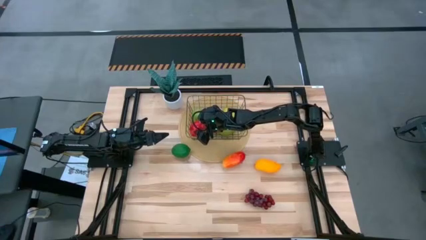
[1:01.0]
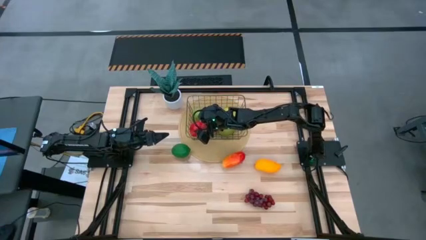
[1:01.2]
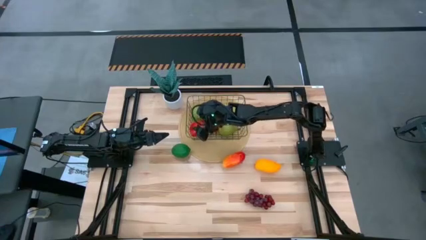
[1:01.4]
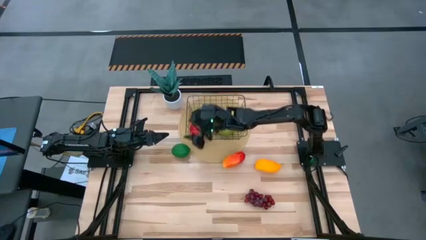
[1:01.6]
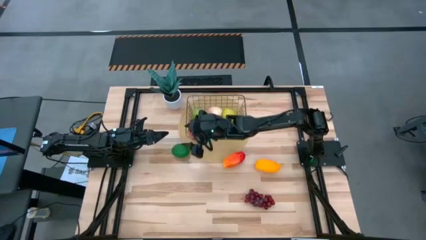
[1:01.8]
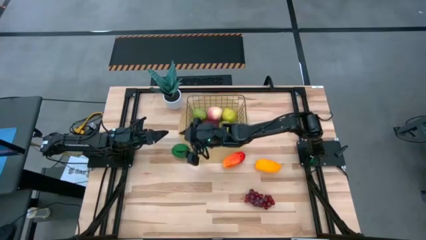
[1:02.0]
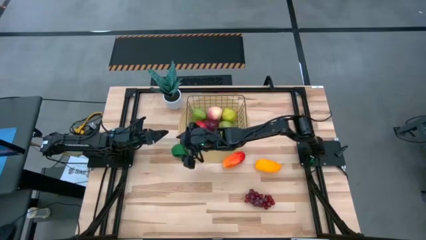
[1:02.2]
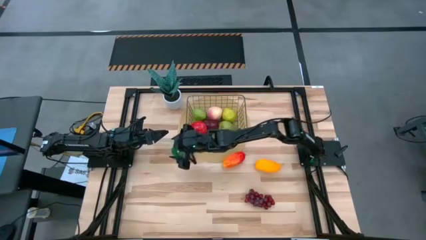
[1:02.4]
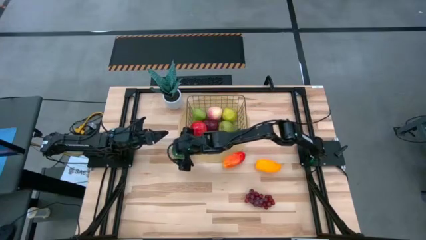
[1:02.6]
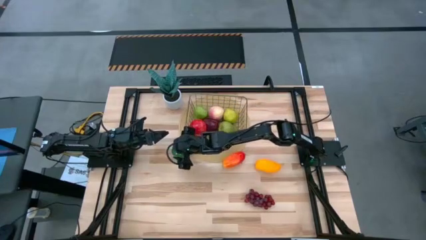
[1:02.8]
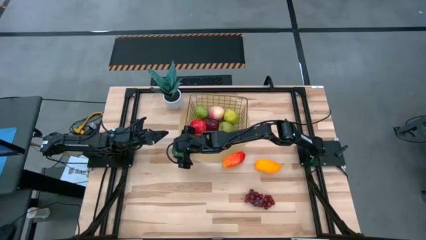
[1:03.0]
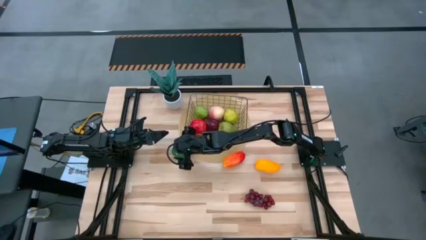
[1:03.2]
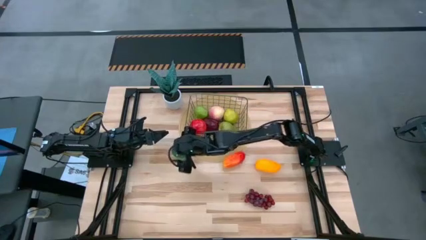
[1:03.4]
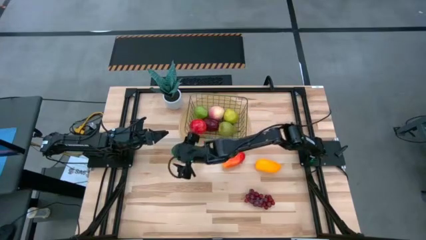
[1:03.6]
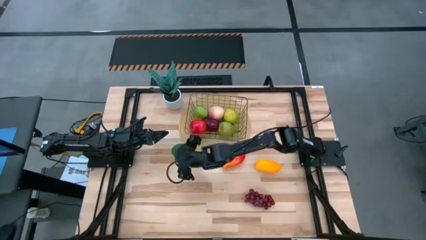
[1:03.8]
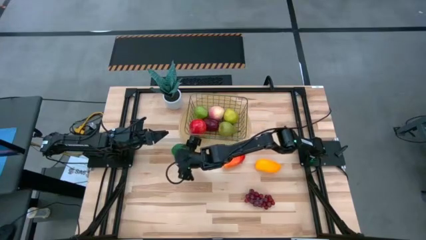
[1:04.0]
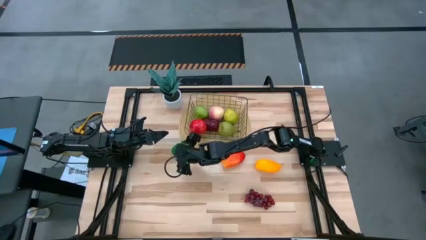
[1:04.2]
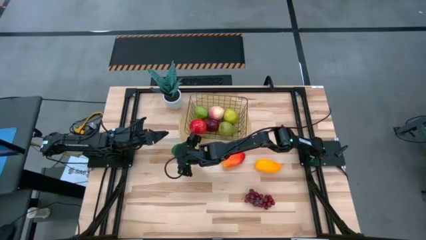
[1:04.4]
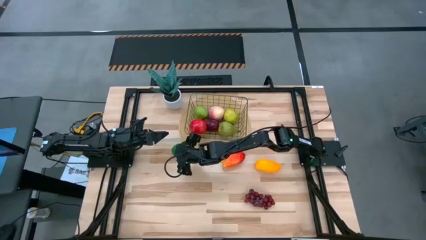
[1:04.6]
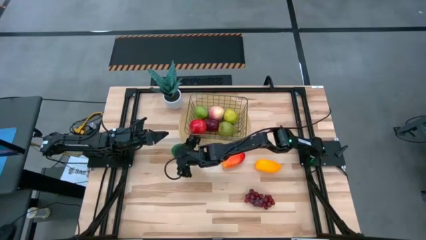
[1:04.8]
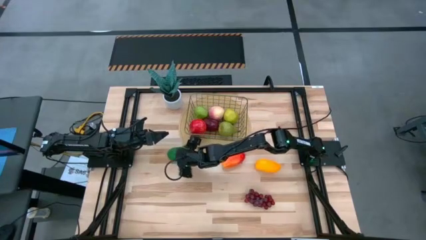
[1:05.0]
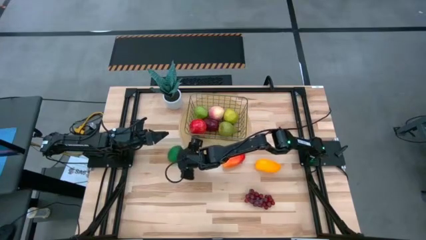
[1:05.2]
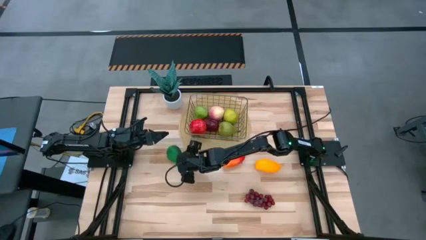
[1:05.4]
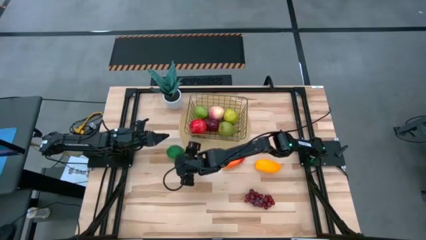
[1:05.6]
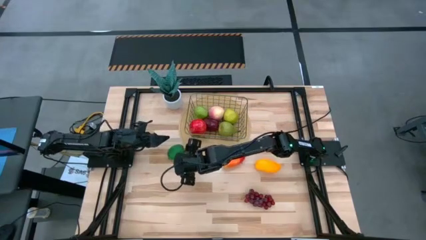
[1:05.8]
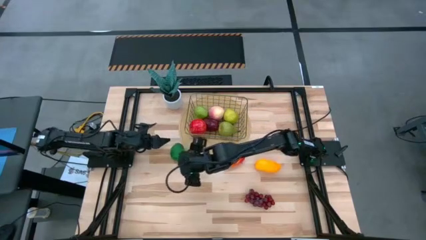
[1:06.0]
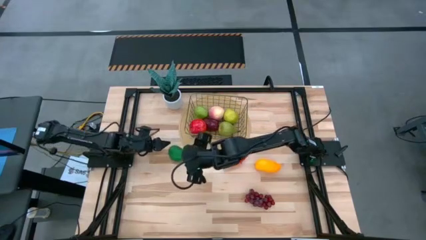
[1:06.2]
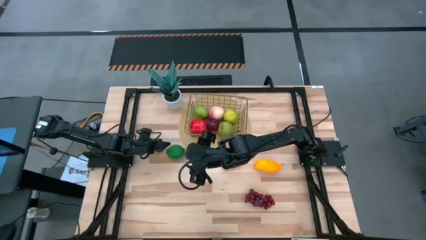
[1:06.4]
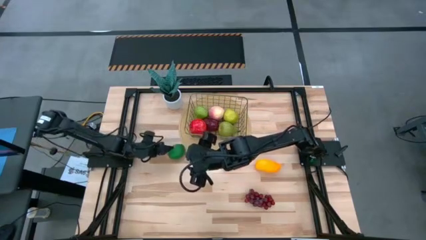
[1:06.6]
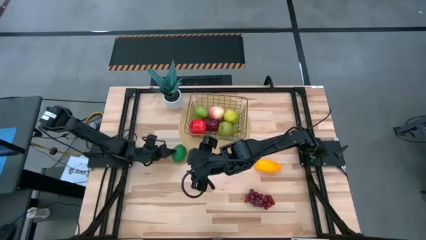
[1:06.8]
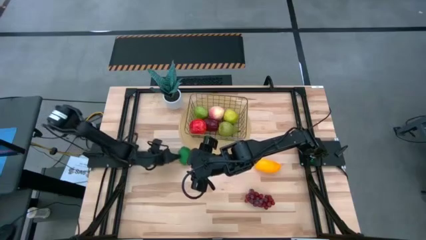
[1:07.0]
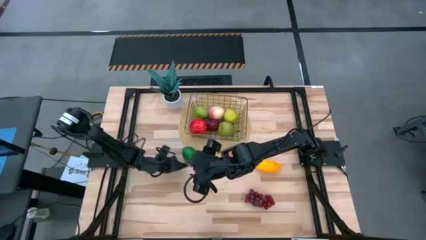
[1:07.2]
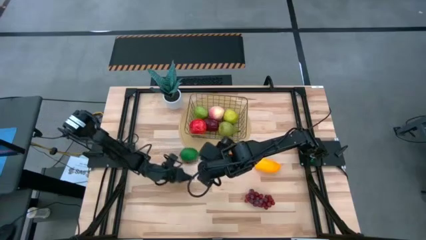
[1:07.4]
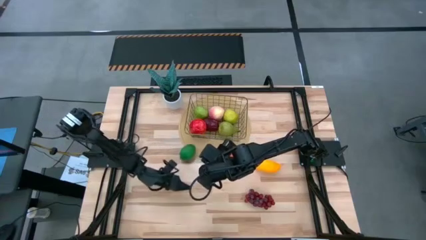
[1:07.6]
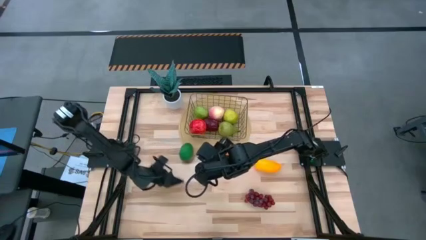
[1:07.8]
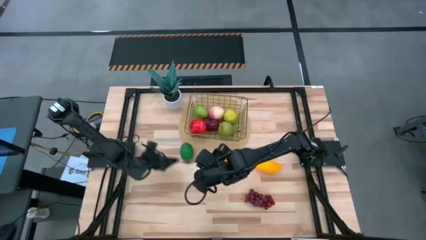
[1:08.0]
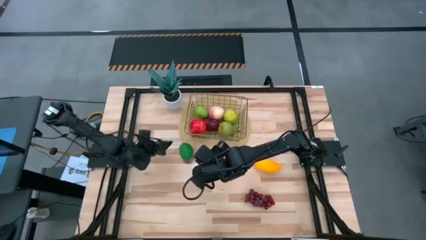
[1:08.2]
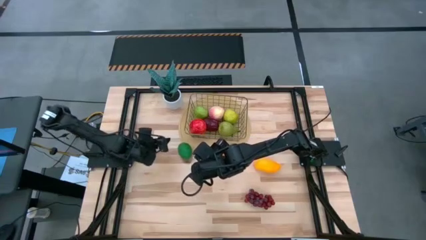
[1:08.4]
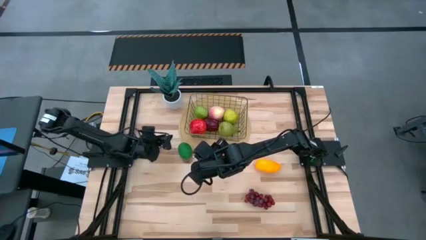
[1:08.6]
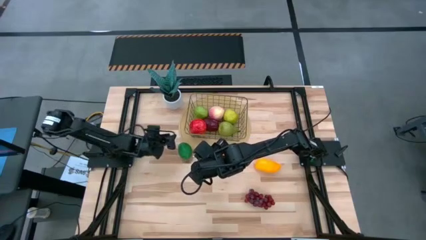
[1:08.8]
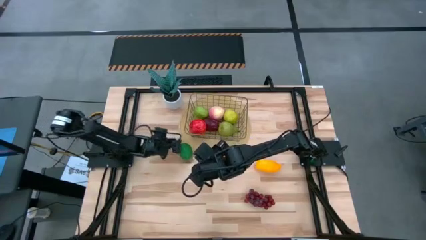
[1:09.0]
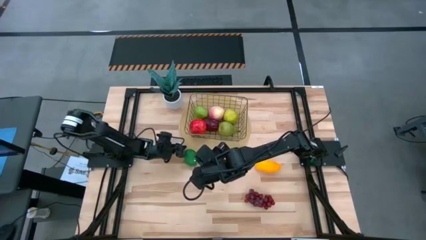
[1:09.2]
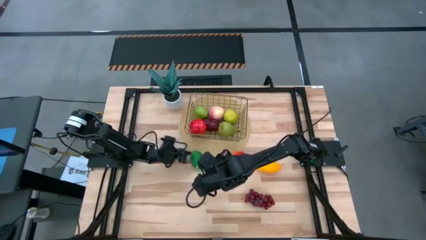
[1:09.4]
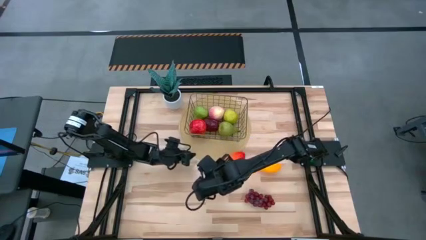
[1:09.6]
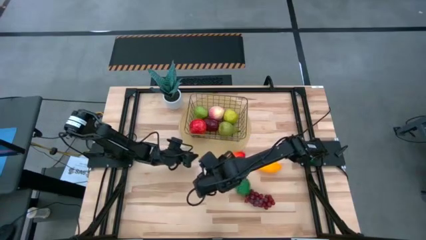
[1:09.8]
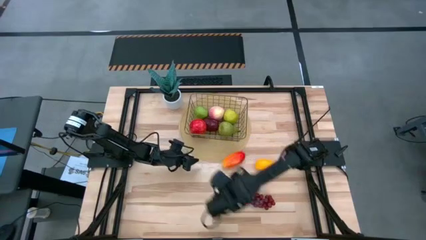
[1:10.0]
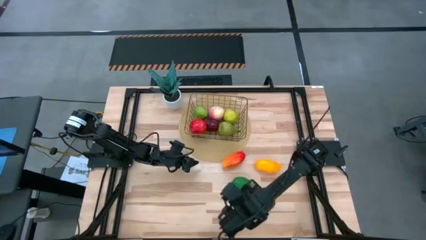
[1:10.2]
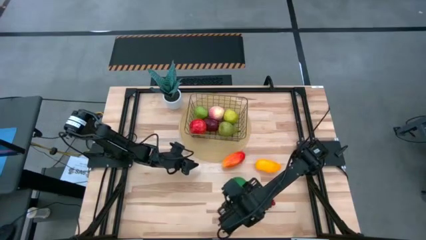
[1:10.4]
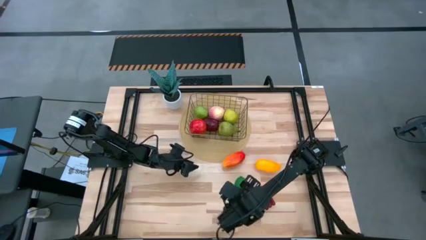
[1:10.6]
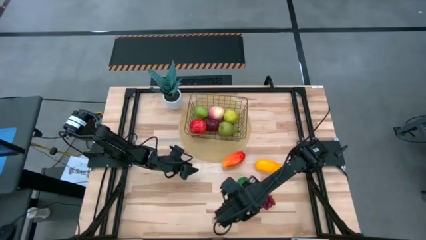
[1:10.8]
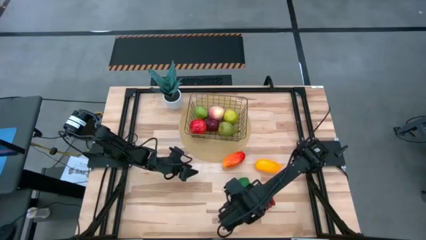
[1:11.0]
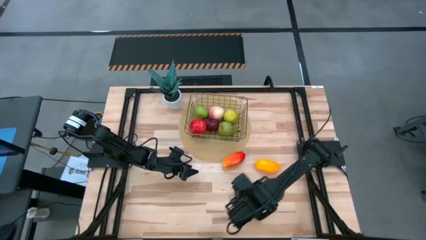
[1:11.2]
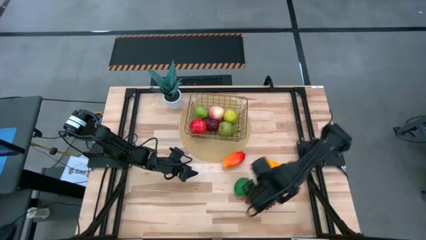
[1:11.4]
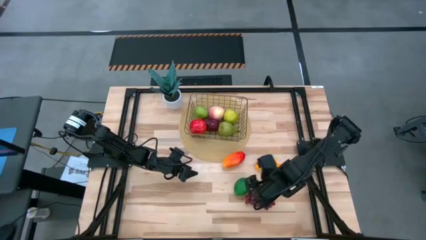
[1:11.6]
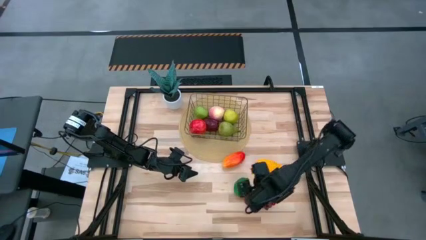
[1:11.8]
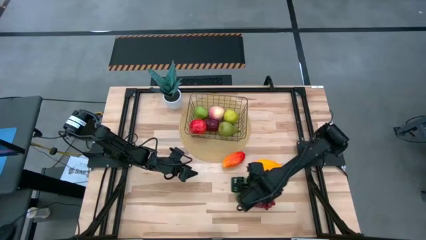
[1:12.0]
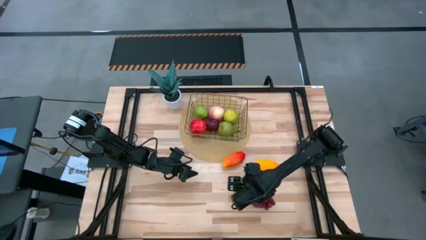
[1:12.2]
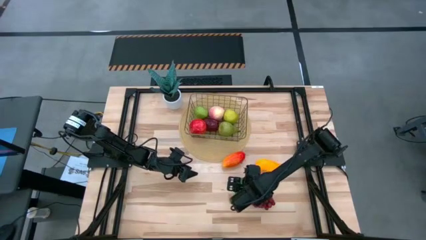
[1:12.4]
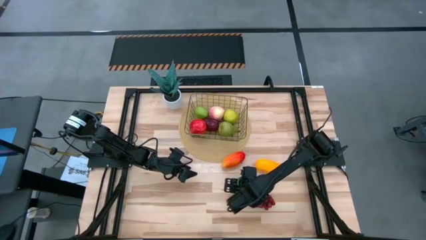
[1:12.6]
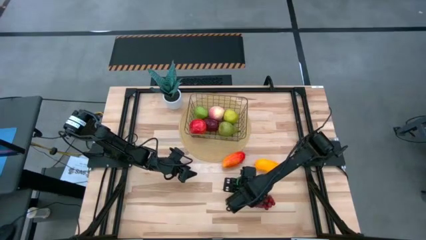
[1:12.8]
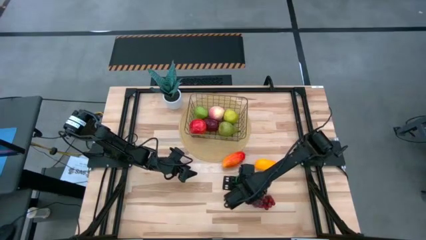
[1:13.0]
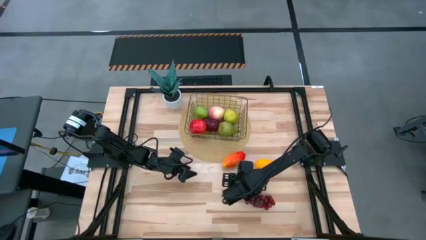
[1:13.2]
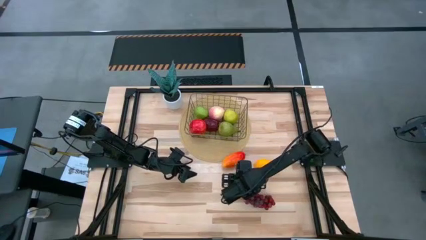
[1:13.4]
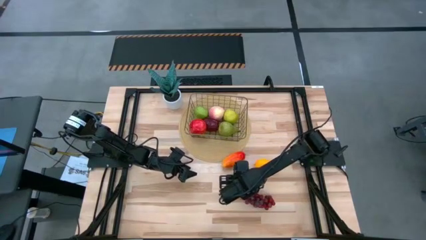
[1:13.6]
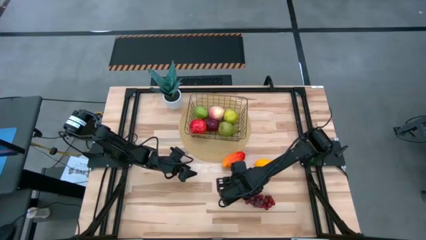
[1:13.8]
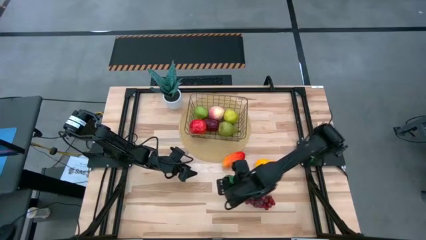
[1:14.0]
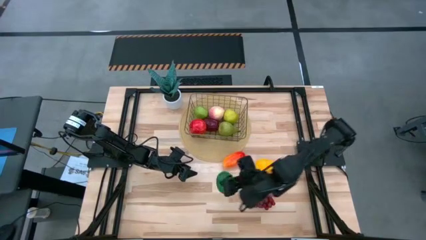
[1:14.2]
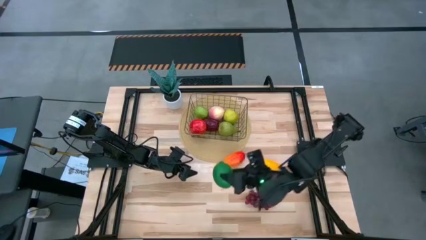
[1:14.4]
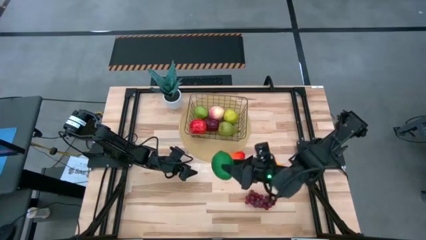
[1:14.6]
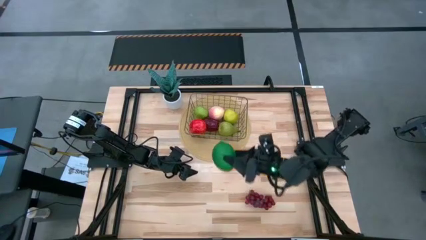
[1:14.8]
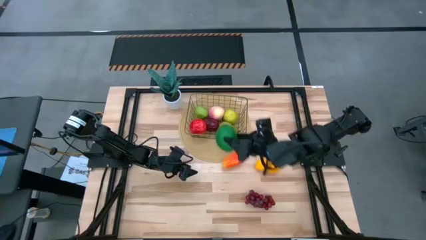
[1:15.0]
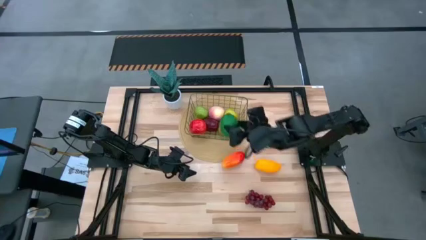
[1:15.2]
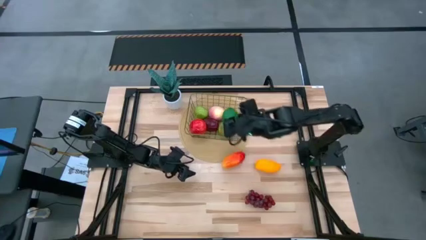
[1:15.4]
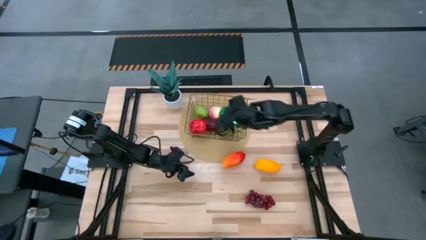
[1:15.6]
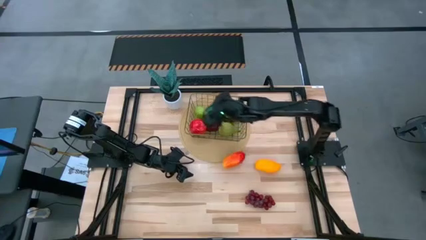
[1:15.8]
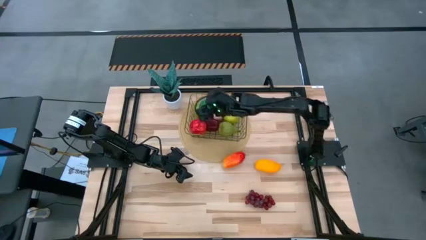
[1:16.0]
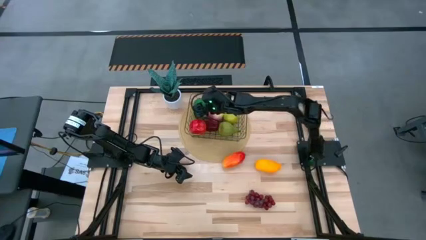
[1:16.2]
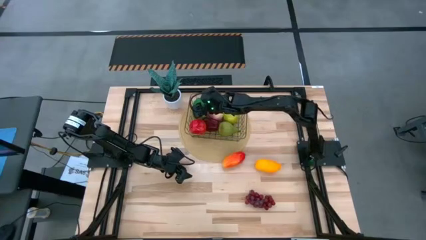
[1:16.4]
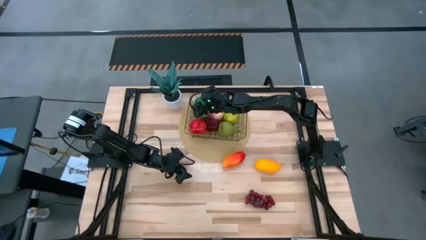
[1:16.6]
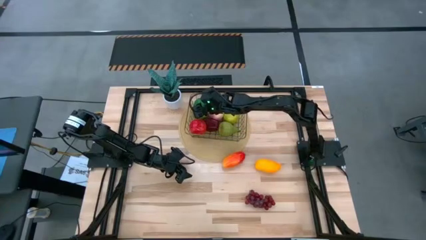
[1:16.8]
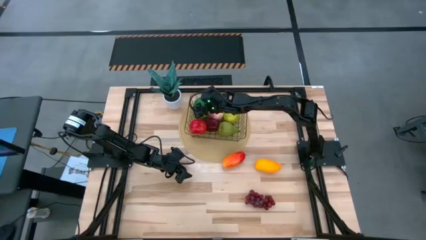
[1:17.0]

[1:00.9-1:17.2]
Task: Build produce basket
Put the green lime into the wire basket

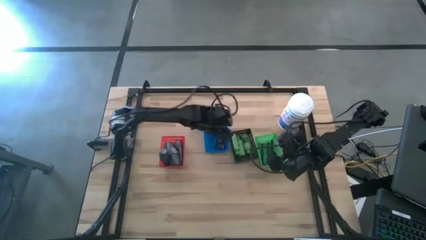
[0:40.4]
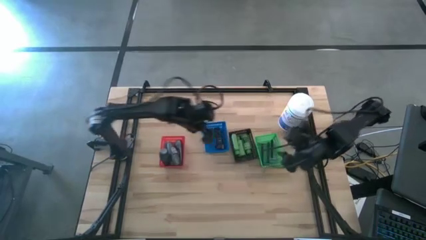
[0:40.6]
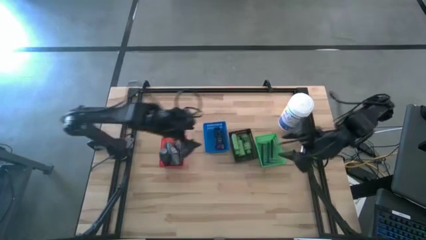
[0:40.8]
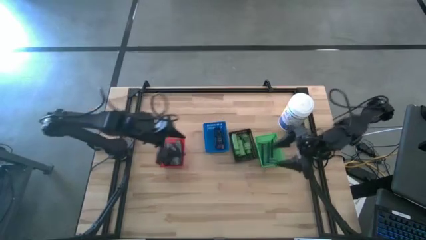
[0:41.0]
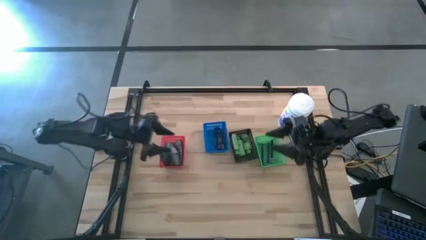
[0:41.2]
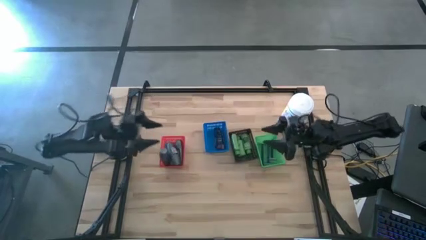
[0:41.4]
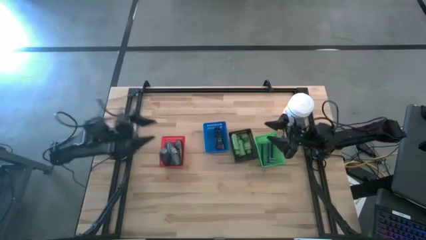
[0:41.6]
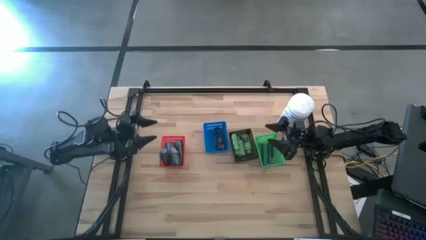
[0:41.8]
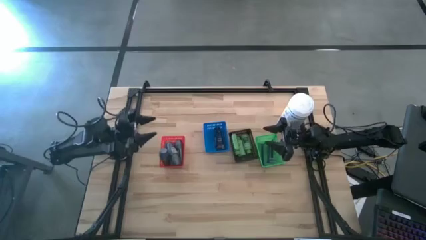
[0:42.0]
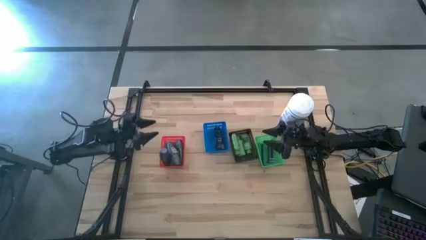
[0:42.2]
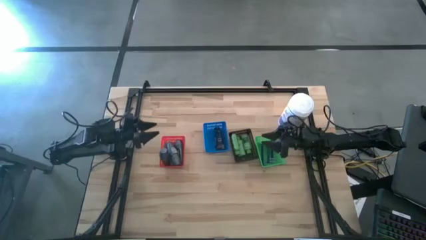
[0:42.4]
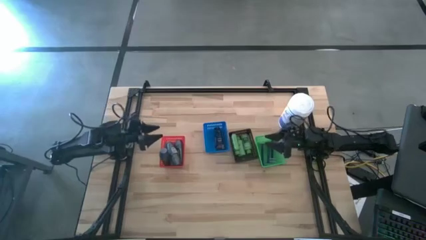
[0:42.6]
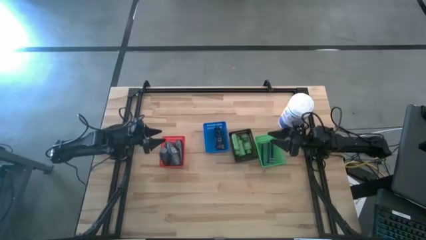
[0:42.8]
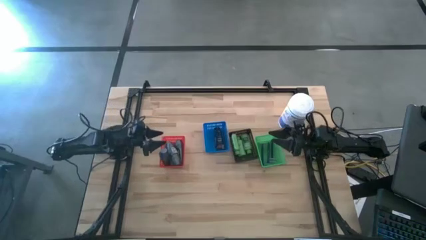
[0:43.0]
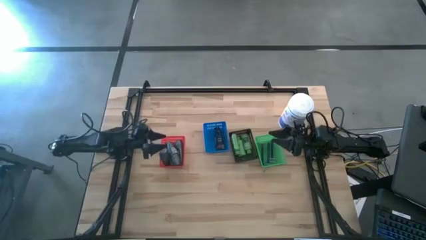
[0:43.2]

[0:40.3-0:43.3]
Task: Pick & Place Travel size toiletries
Return to Home Position
